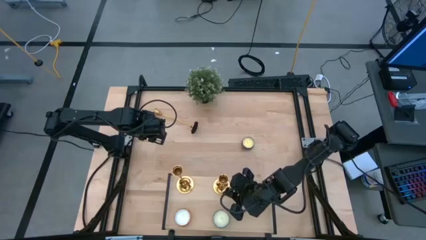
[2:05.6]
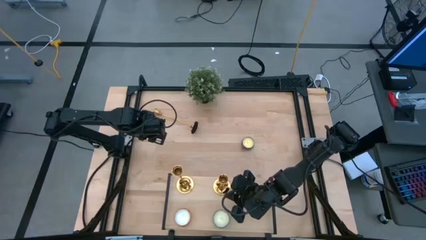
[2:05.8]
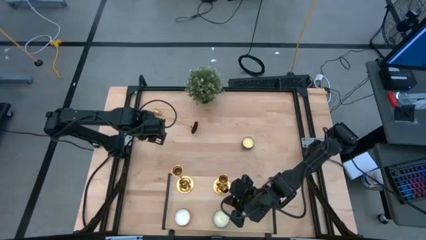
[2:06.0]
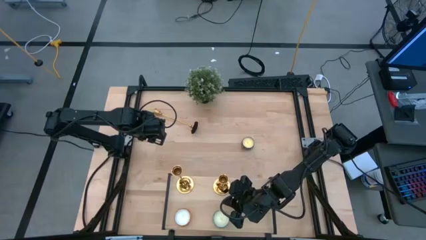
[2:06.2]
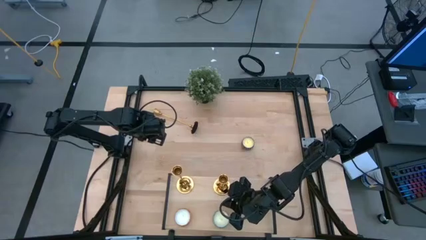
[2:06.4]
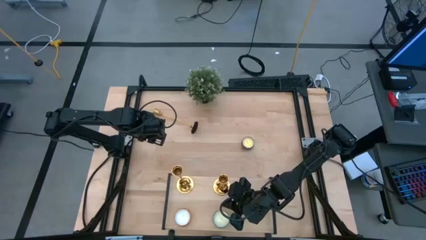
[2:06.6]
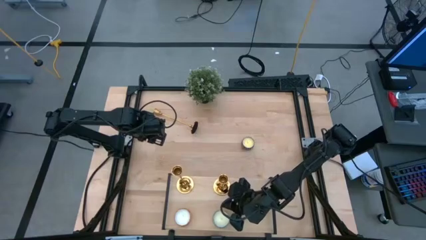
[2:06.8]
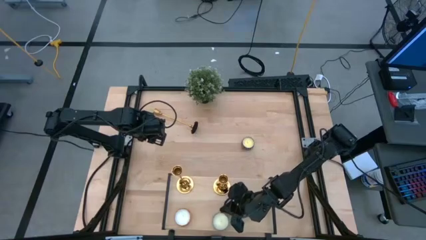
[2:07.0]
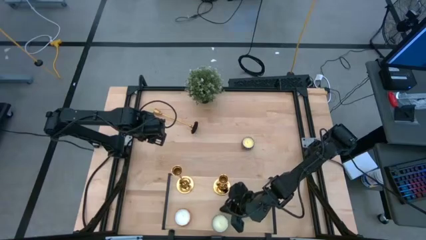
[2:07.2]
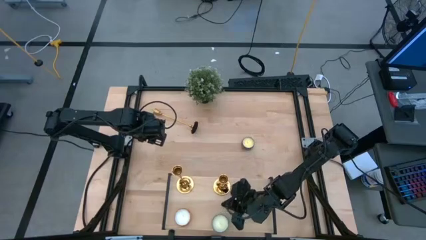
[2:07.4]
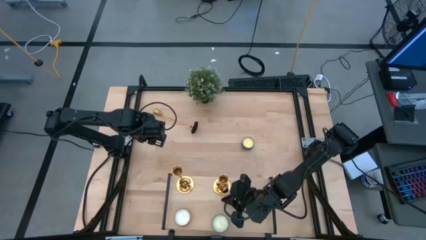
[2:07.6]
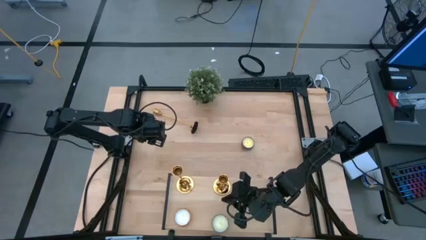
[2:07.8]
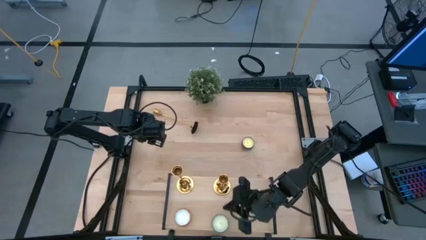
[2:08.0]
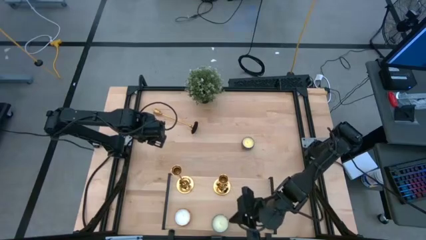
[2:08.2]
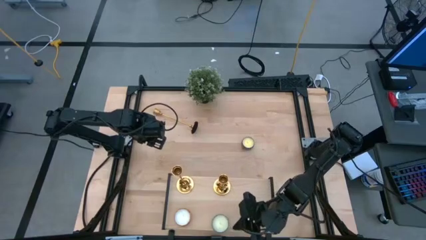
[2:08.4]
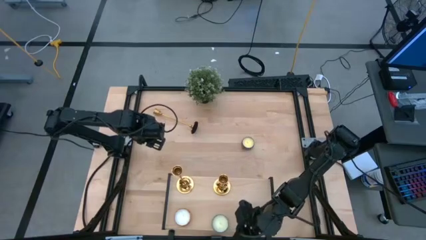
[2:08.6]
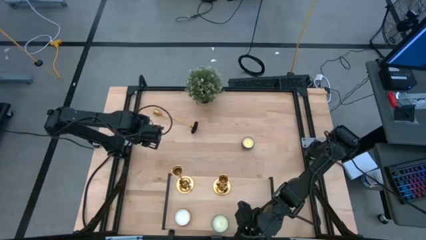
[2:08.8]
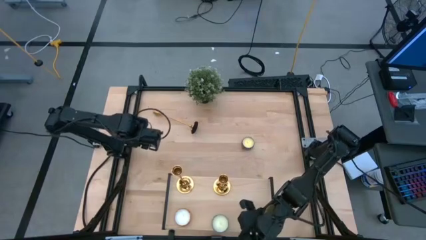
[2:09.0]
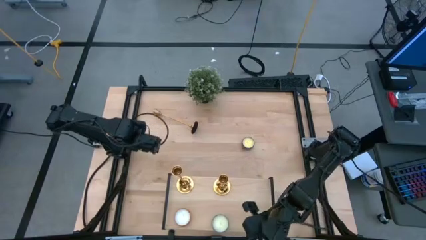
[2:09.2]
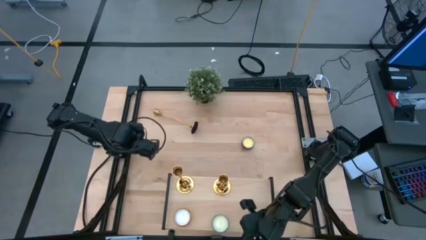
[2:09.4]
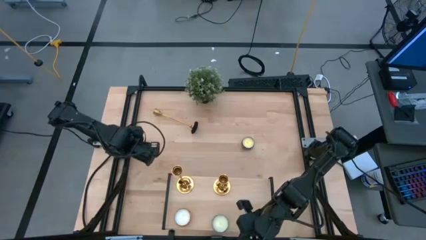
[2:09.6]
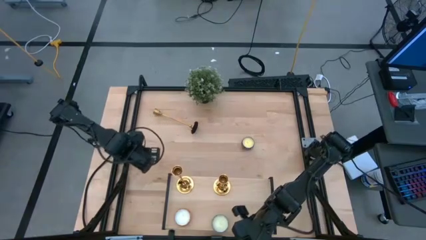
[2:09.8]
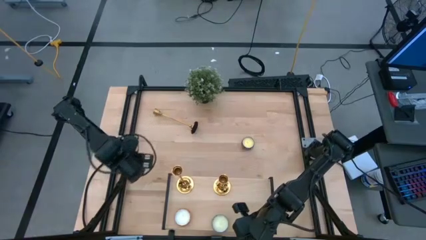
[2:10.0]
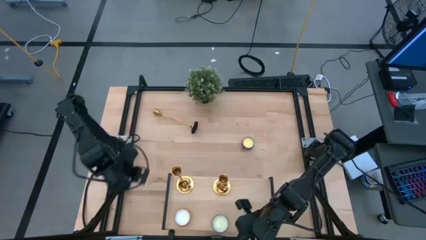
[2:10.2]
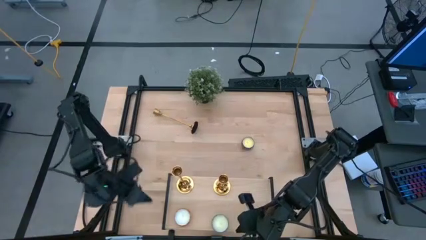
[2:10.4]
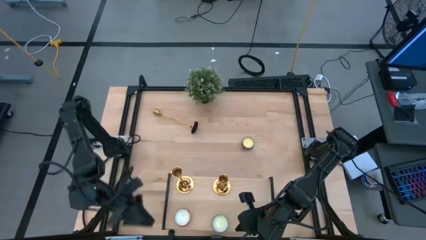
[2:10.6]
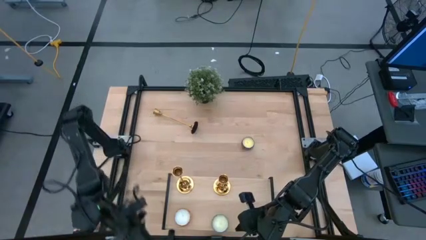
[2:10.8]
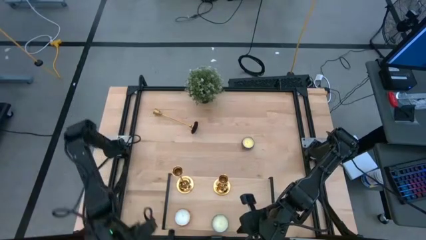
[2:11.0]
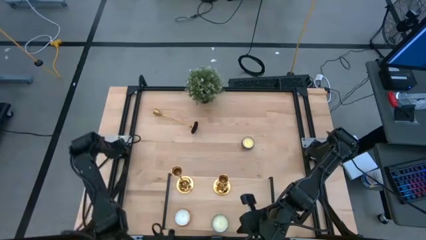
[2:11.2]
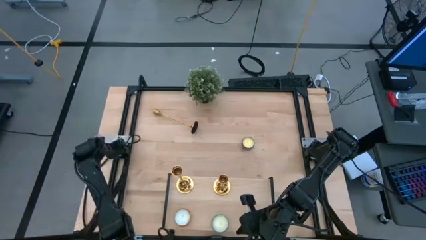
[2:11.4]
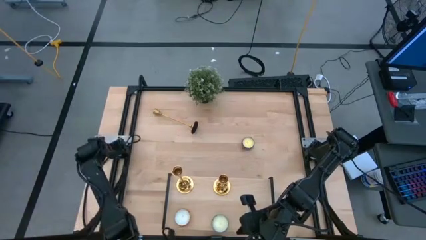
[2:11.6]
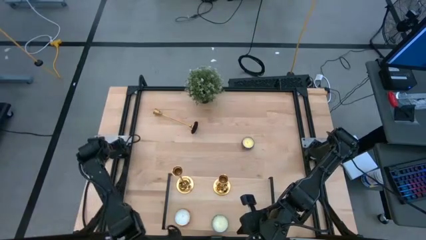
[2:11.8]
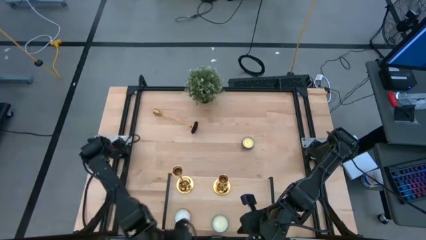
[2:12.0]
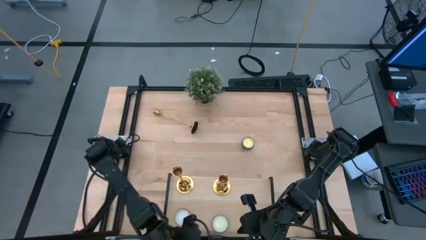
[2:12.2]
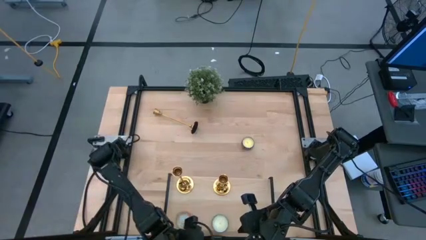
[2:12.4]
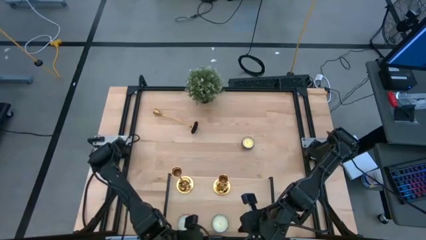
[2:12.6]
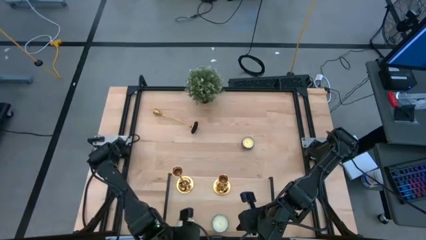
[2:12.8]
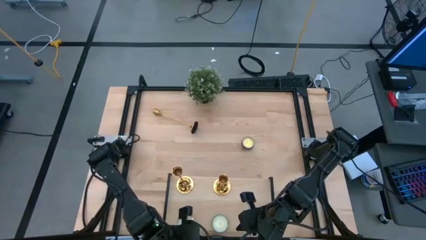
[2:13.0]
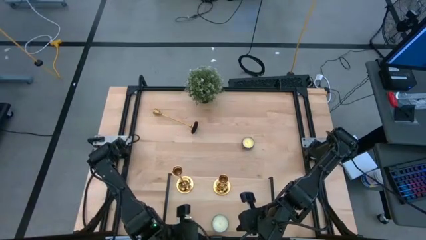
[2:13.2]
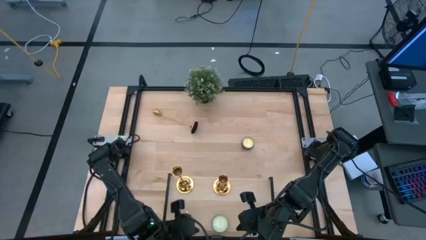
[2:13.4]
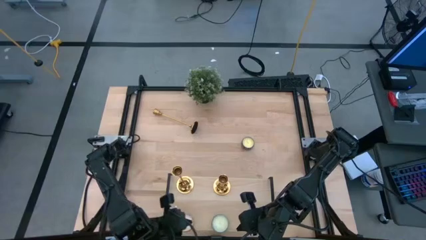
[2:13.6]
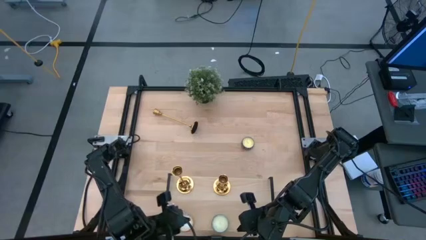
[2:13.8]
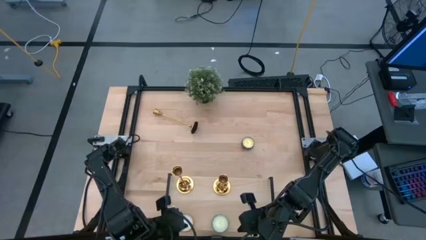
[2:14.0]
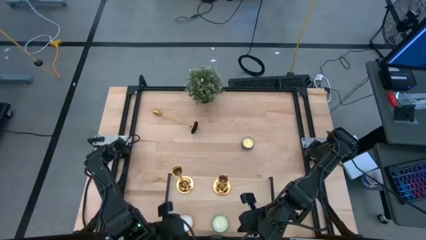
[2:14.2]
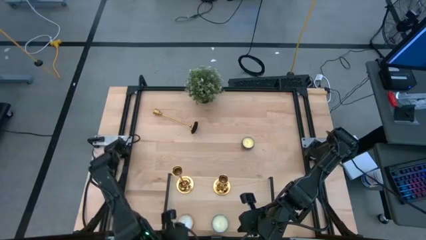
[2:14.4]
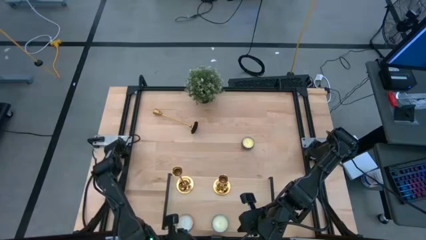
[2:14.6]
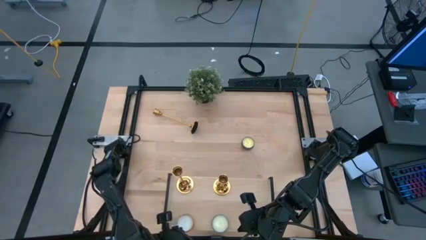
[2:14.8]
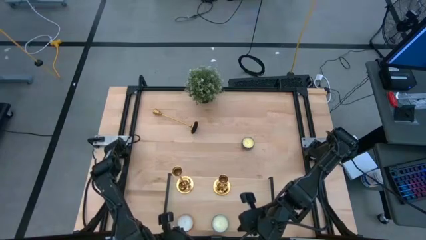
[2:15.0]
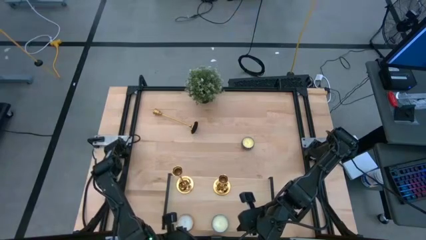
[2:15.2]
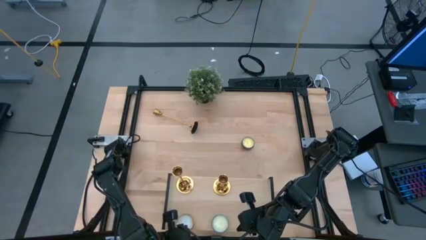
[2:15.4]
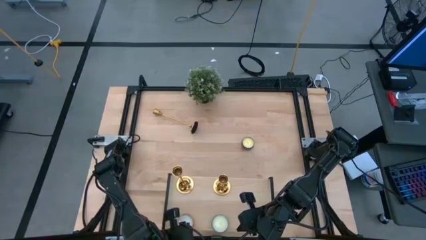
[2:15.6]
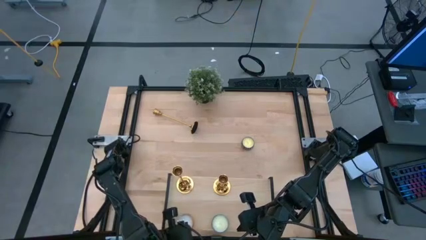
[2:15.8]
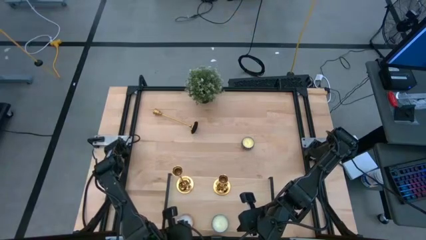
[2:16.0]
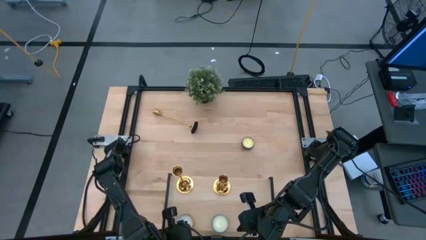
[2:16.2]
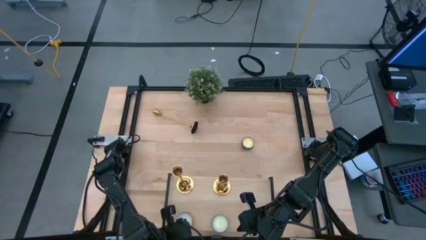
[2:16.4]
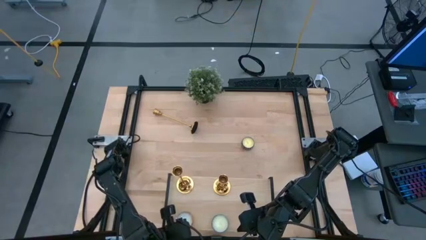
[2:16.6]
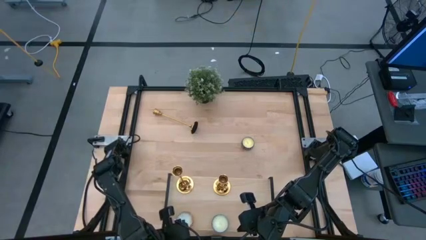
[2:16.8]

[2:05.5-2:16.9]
Task: Pick & Place candle stick holders
Adjust the scented candles on the shelf

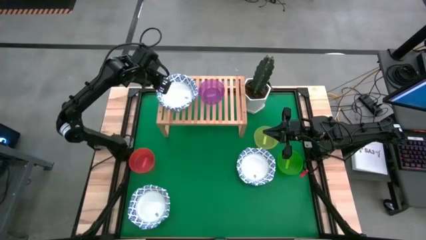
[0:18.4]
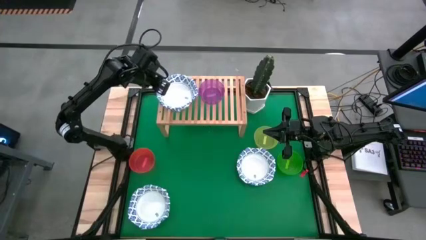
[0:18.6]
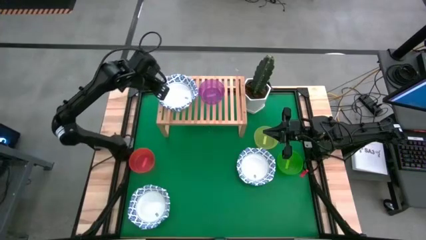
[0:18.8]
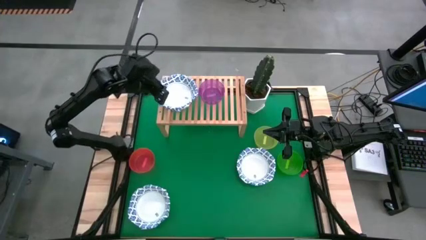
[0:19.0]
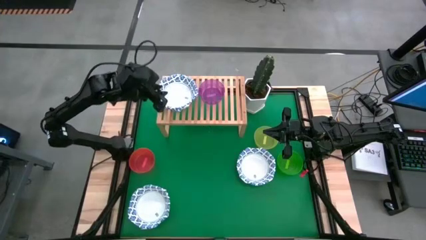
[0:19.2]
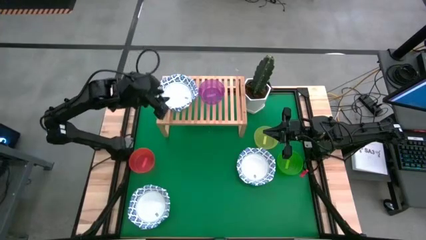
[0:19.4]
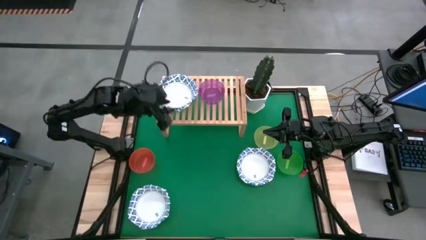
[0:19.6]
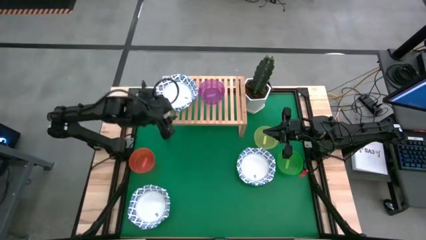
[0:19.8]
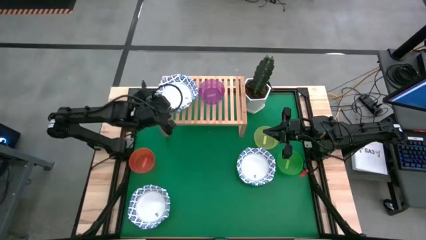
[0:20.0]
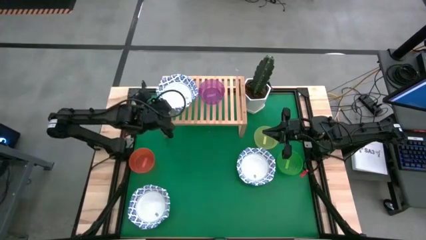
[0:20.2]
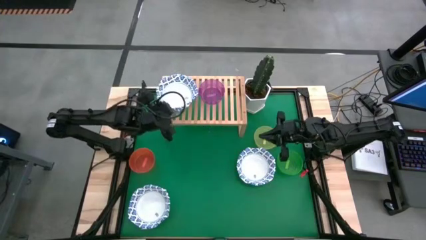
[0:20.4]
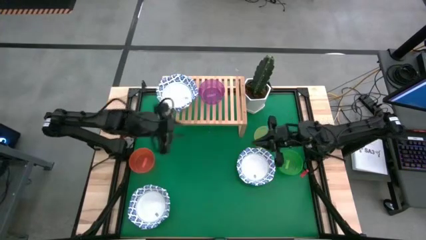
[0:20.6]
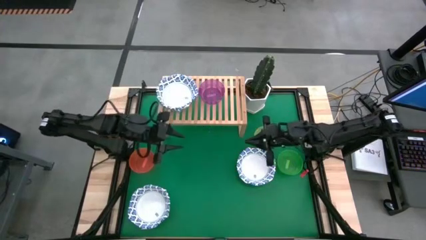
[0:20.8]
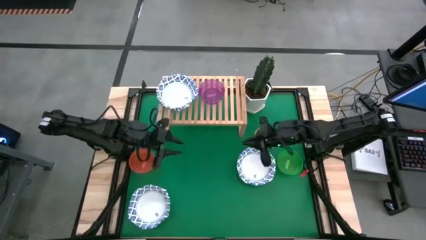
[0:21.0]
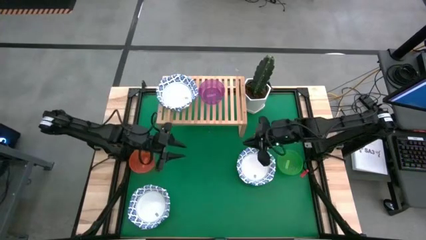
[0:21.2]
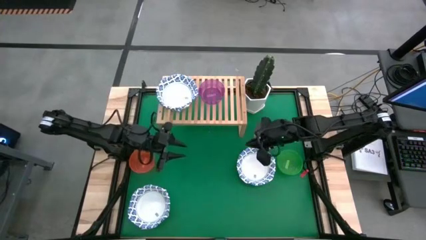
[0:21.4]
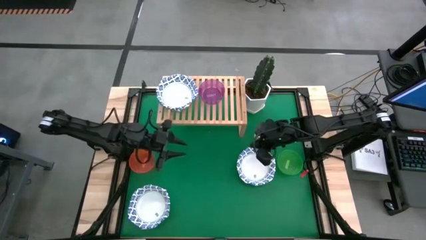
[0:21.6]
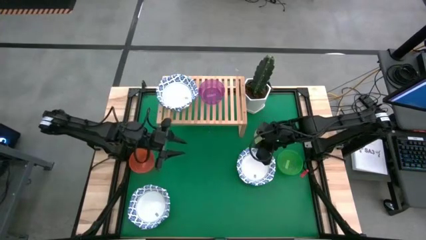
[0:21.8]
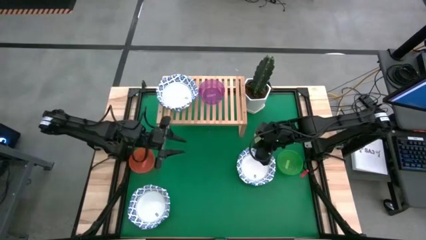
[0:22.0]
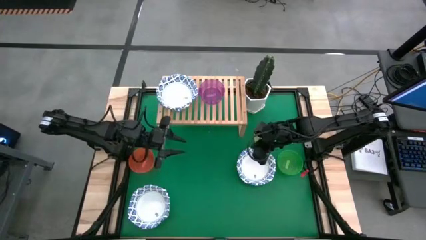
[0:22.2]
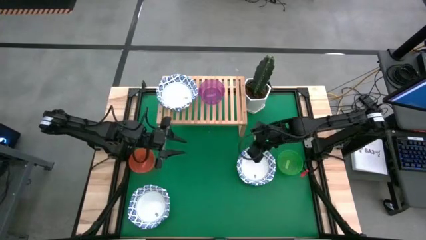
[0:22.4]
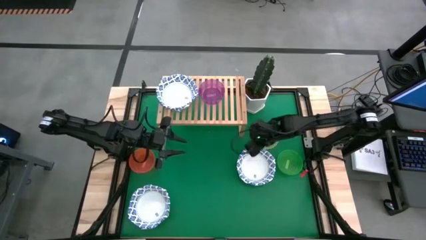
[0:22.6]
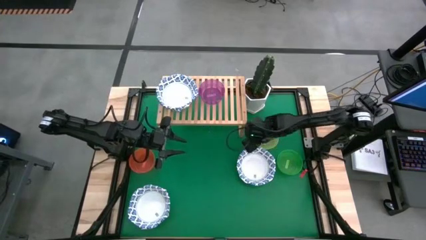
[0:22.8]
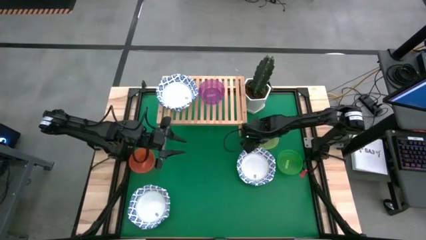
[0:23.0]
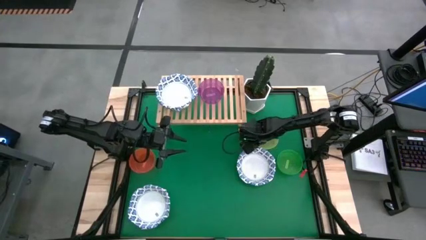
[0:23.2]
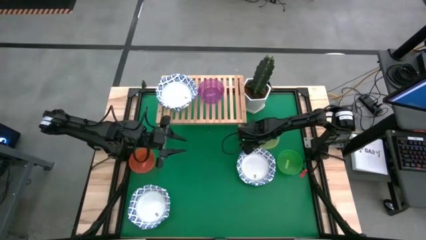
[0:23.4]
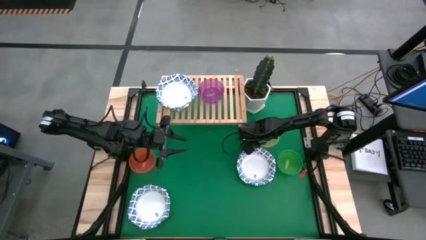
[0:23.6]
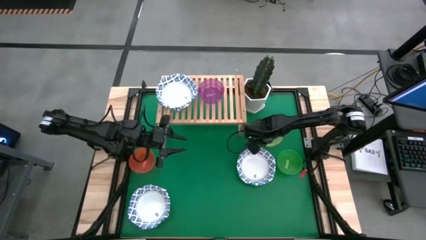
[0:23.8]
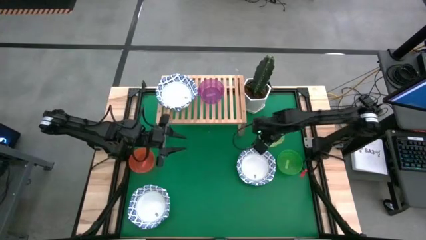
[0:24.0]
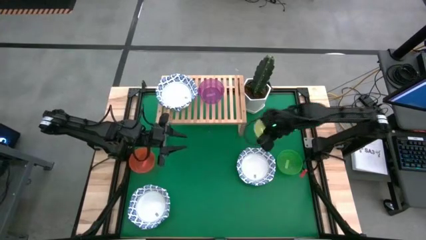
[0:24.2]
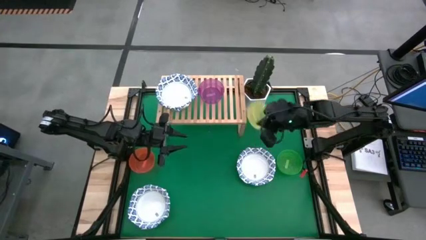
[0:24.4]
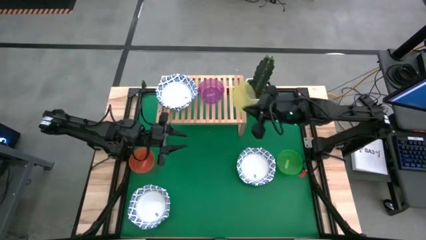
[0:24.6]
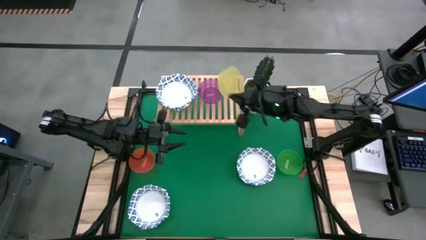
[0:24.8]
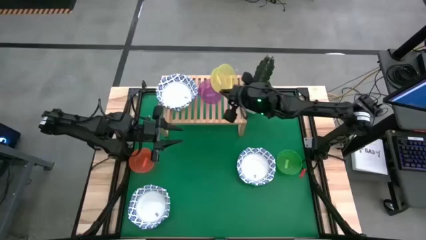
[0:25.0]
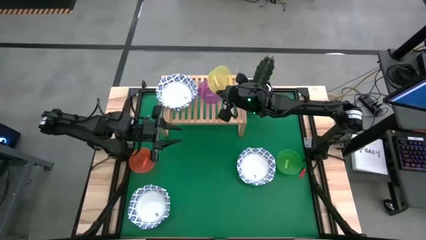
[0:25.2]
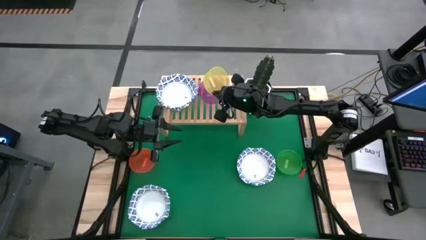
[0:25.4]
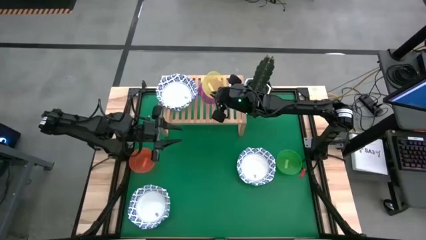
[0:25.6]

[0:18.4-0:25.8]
Task: Place and stack bowls onto a shelf
Stack the yellow bowl on top of the violet bowl on the shelf
